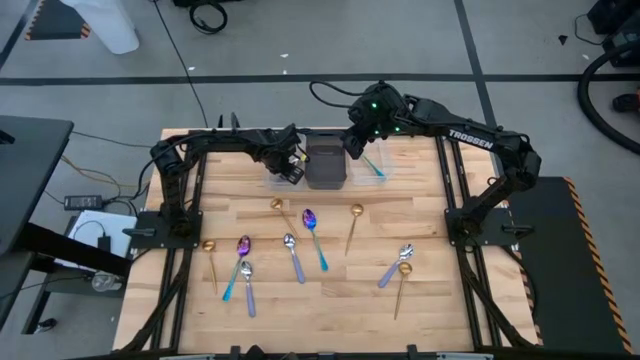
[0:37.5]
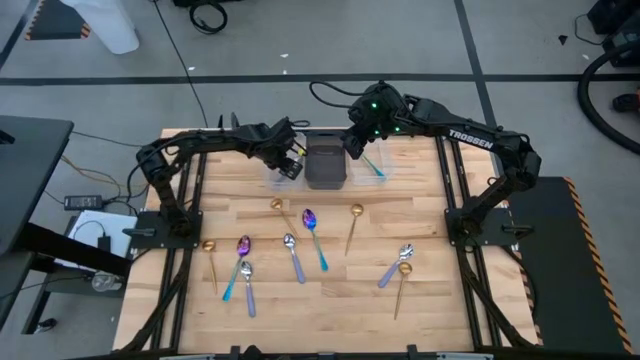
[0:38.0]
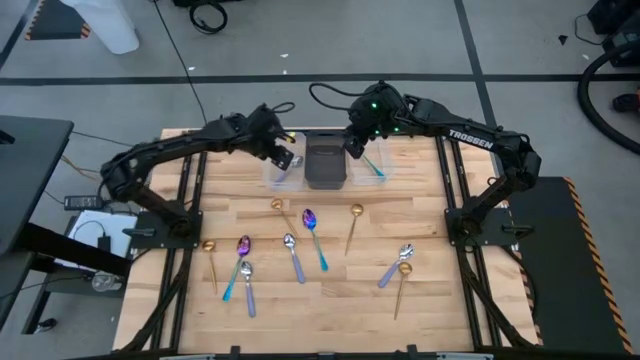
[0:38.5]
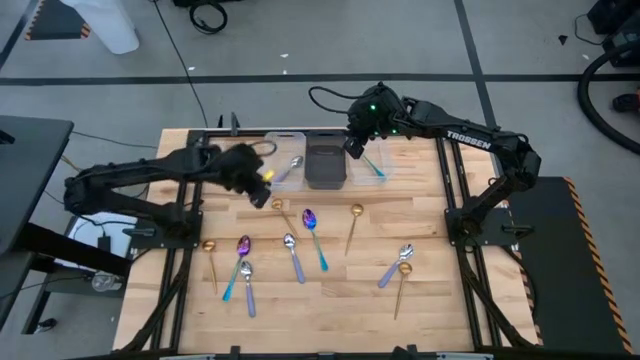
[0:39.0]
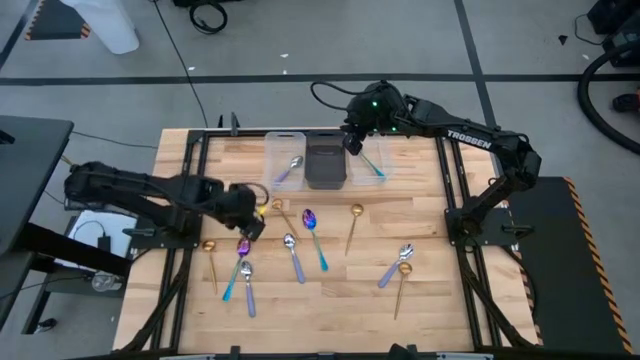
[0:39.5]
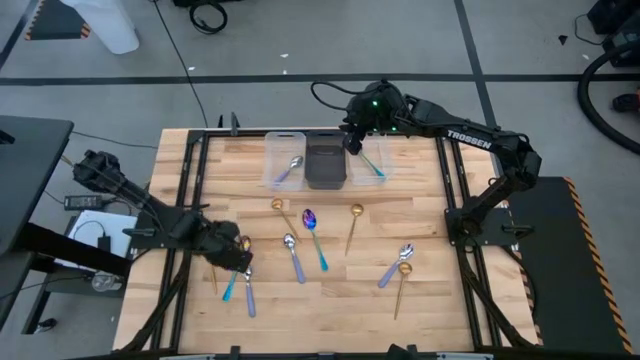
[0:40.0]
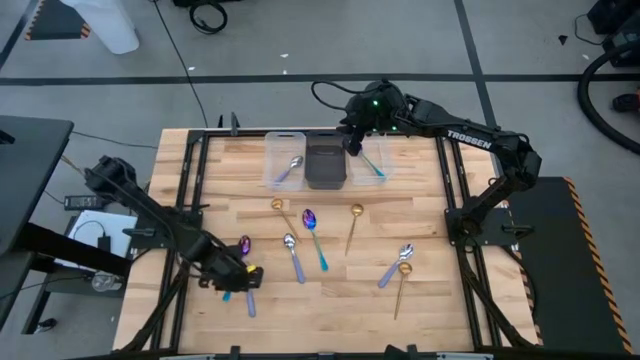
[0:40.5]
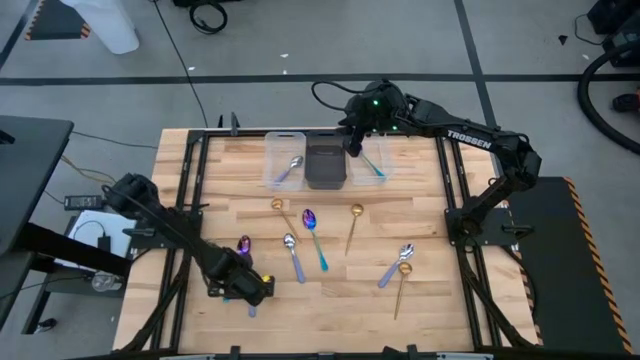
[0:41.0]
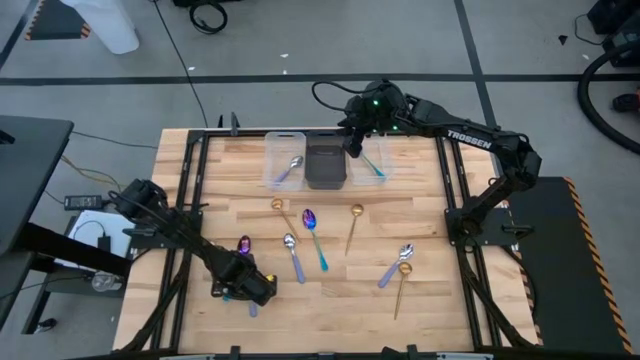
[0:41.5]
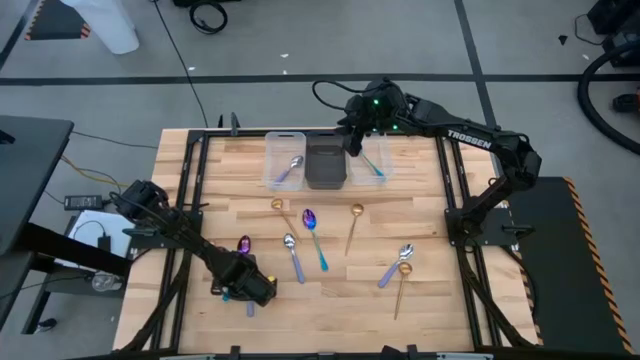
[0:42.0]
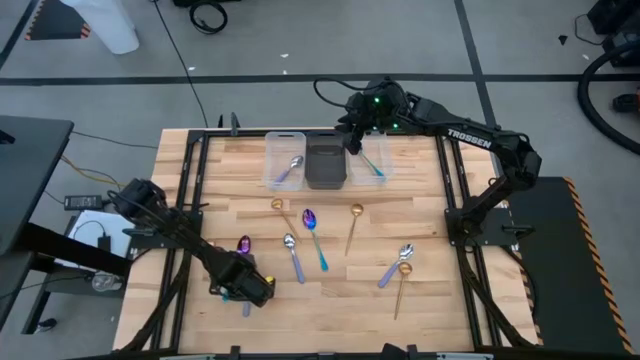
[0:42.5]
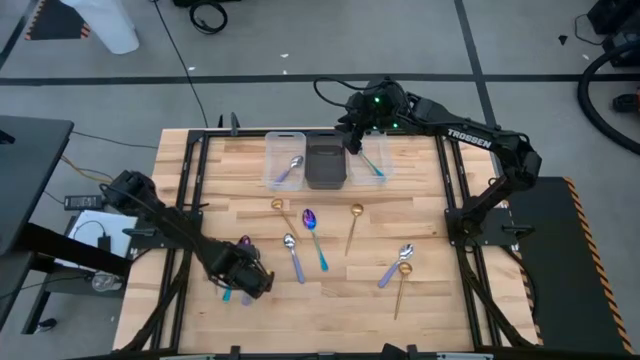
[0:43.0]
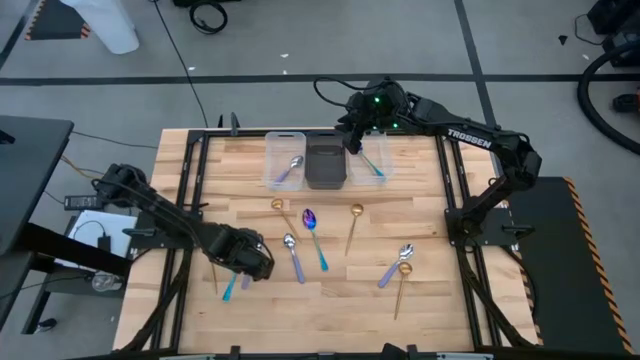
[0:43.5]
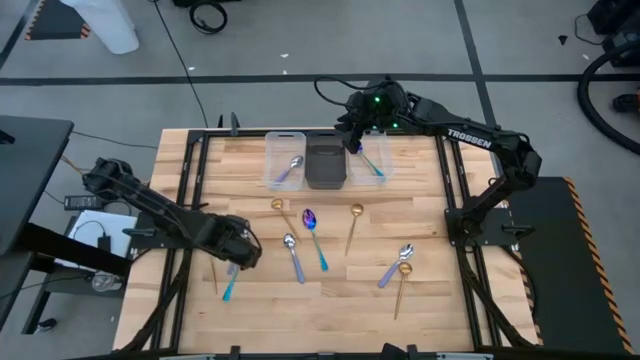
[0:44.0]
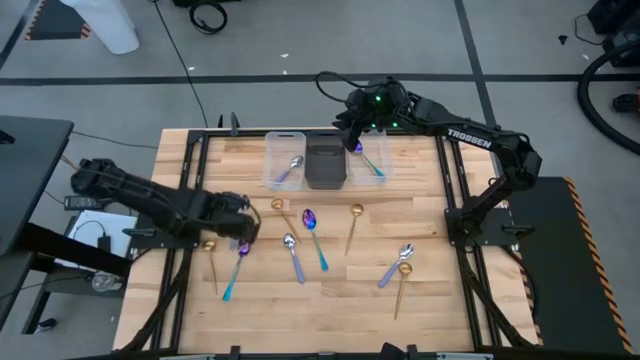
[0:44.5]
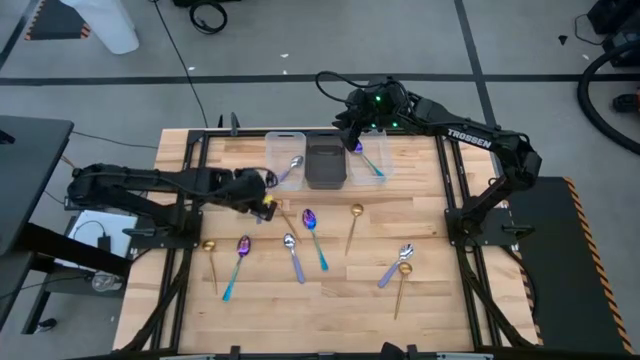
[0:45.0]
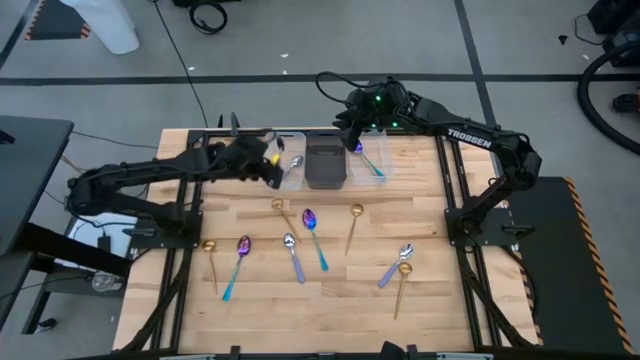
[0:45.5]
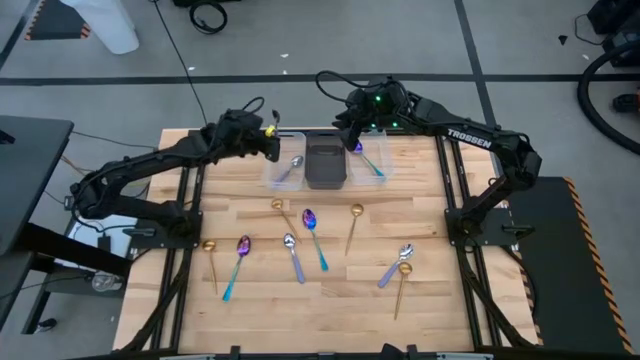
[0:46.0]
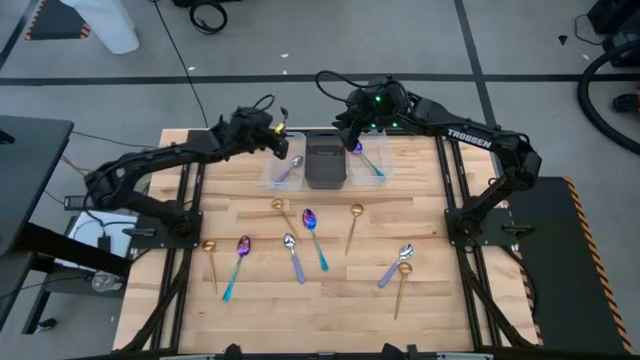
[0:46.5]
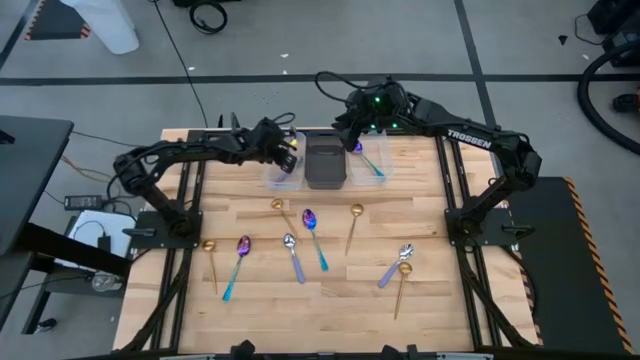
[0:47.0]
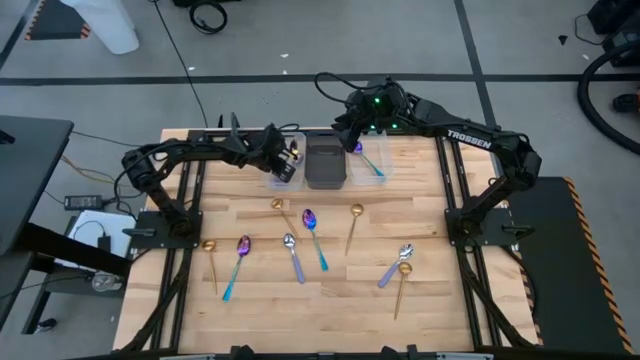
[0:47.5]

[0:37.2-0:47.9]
Task: Sort silverware by color (type)
Put the bottom left purple spoon into the left transparent bin

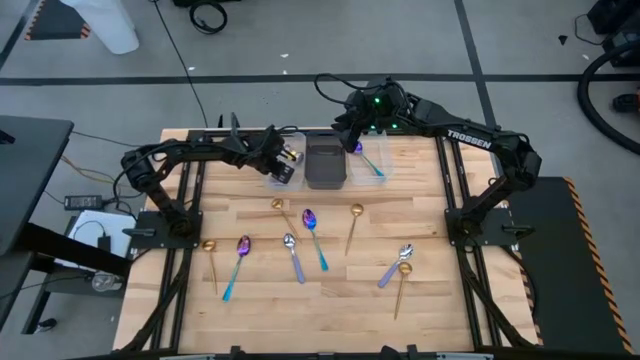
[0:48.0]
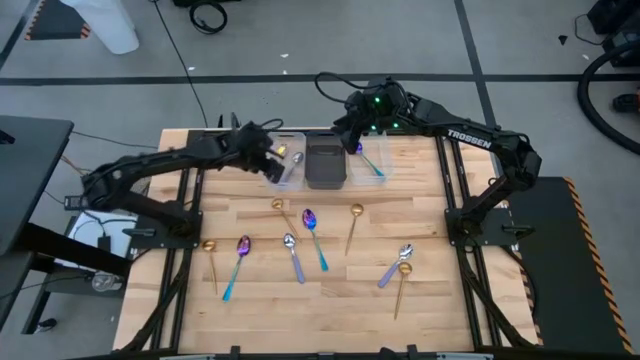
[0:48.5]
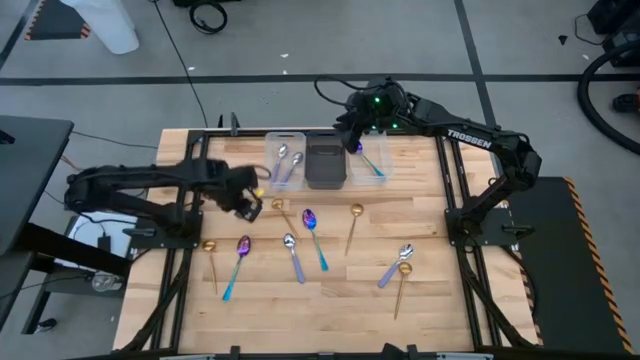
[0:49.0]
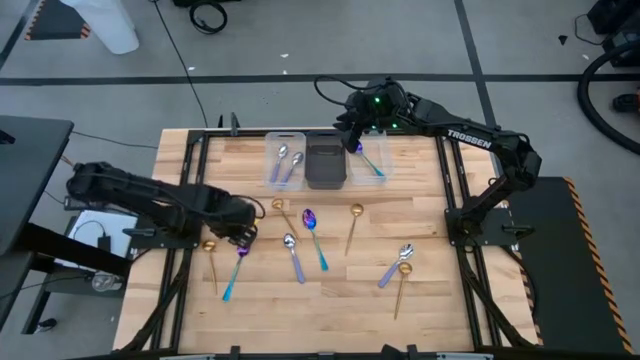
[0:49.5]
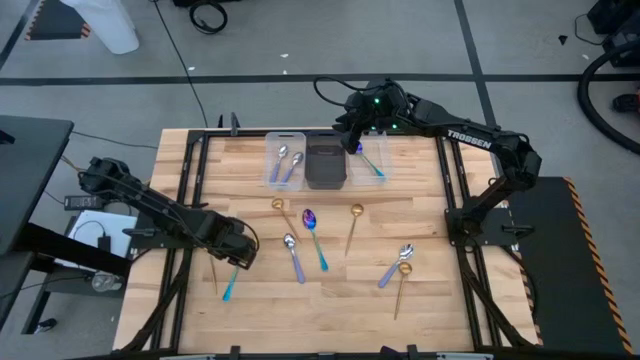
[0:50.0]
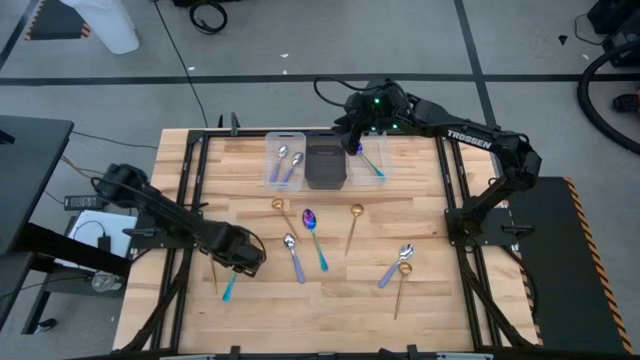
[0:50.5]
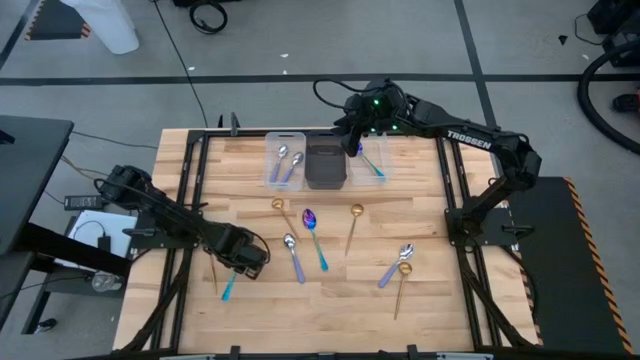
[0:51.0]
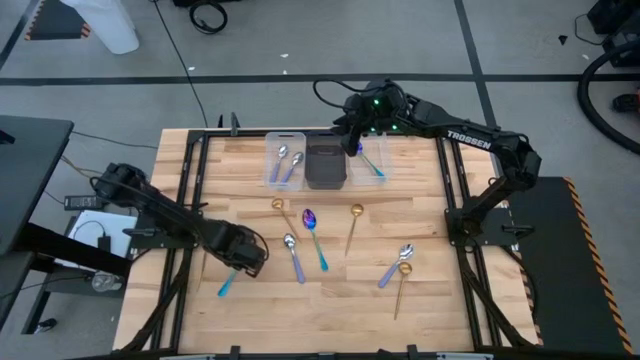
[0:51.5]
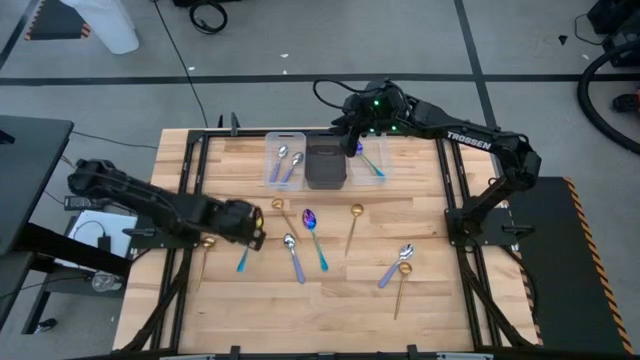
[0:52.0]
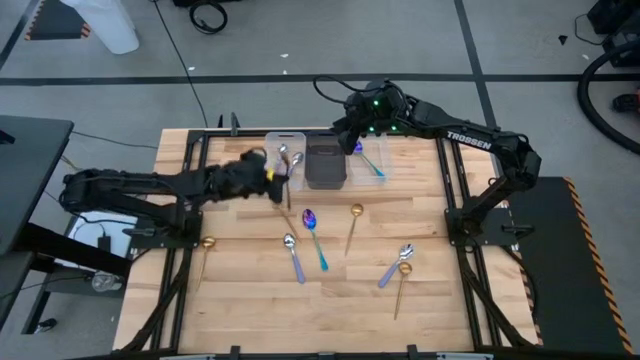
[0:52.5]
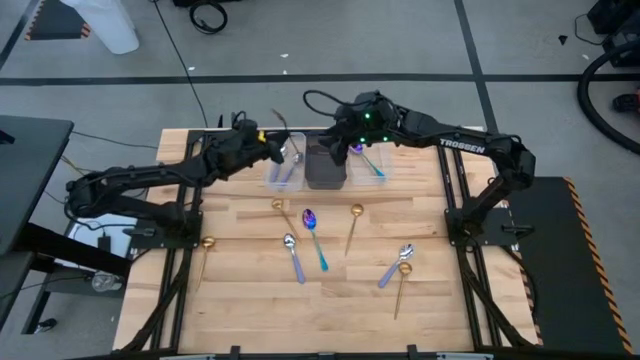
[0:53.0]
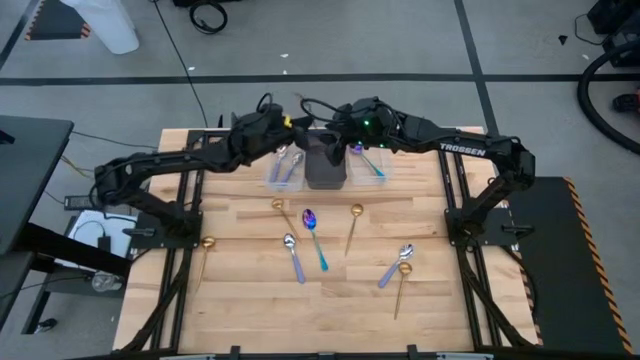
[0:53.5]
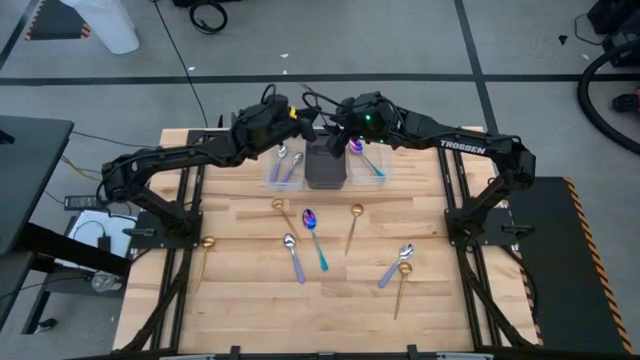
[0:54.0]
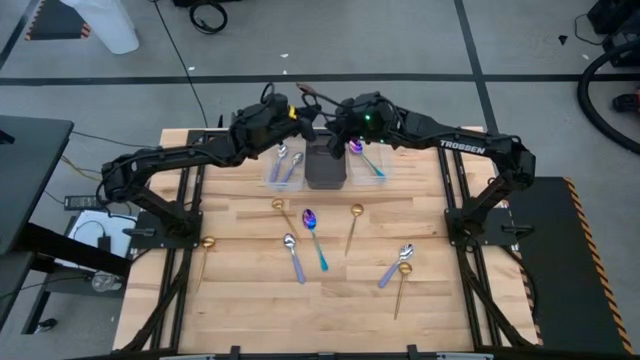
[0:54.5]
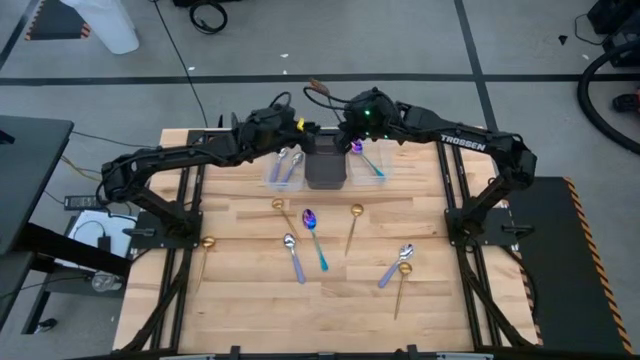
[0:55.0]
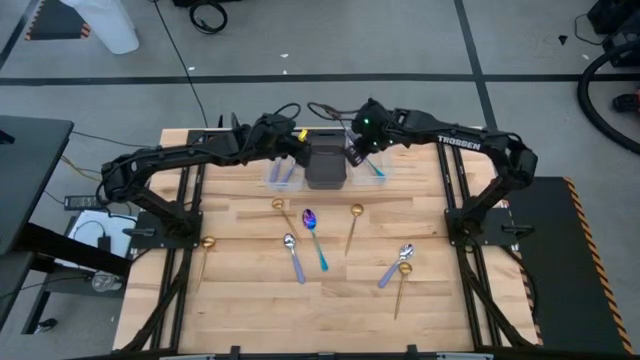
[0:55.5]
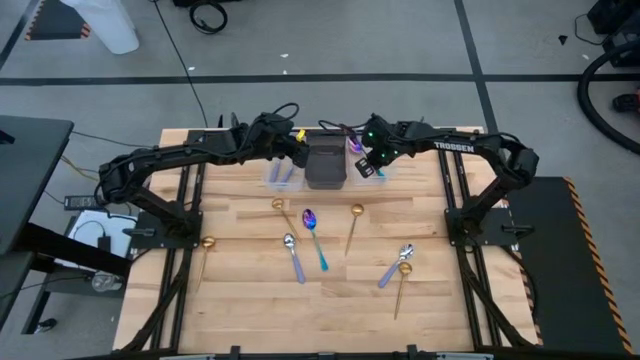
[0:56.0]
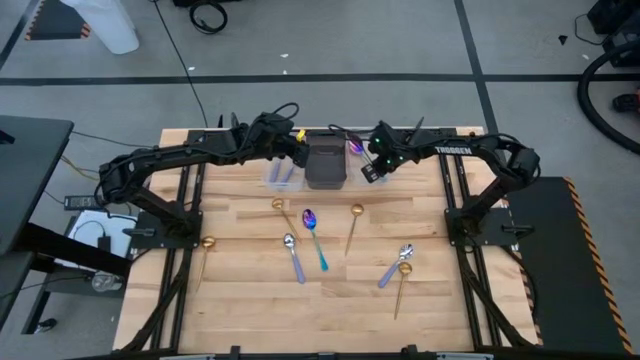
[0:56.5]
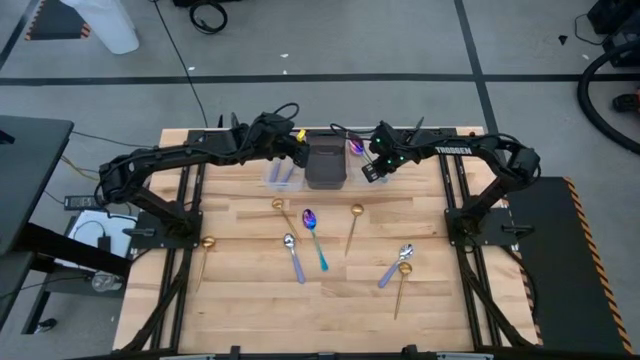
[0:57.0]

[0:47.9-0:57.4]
Put the left blue spoon into the right transparent bin

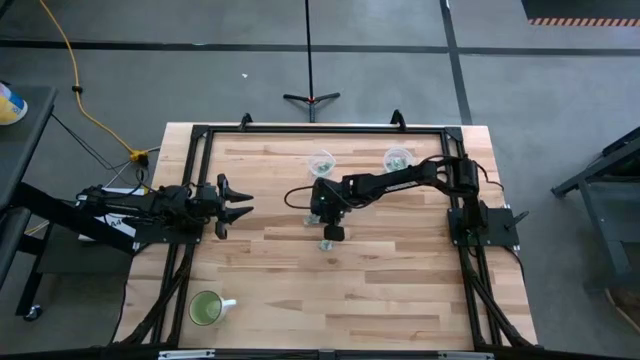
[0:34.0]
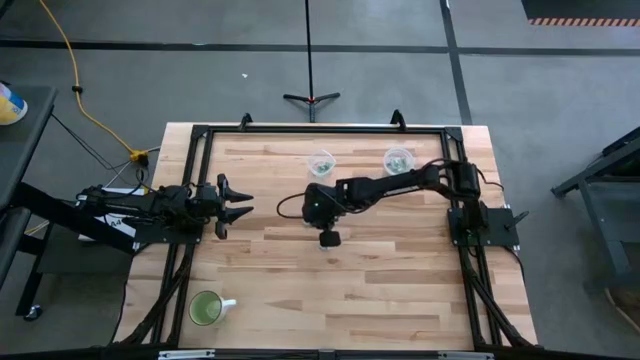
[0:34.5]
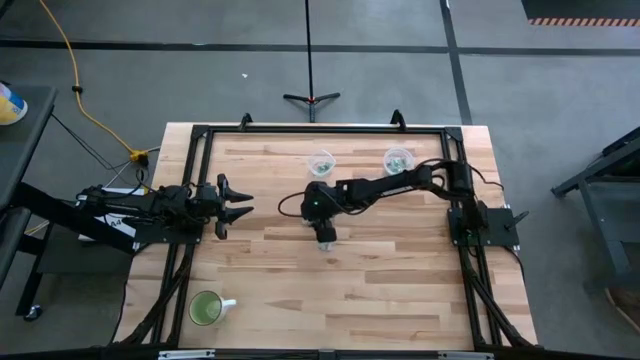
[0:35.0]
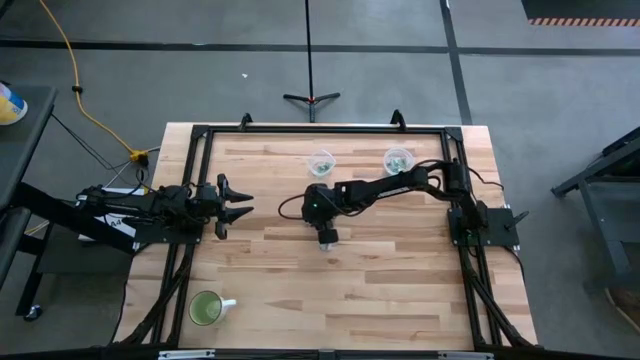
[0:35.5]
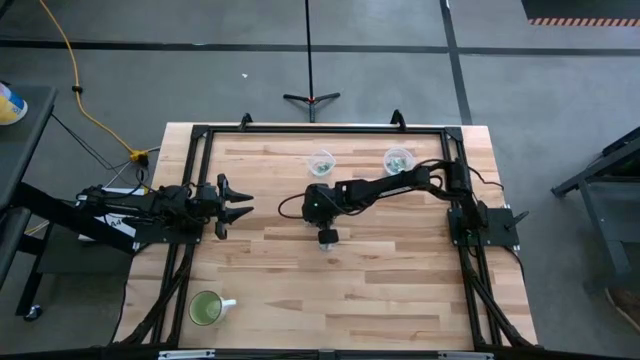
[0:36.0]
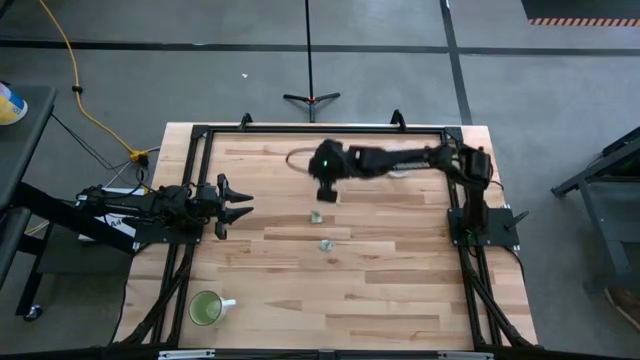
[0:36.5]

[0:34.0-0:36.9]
Task: Pick and place Stevia / Truvia into bins
Put the stevia packet into the left transparent container
